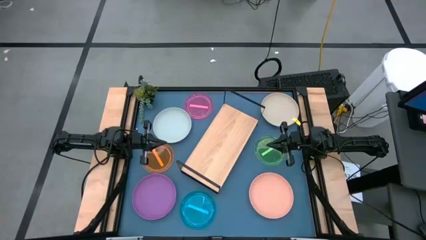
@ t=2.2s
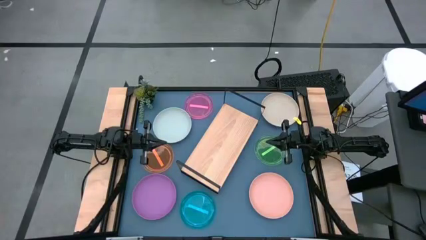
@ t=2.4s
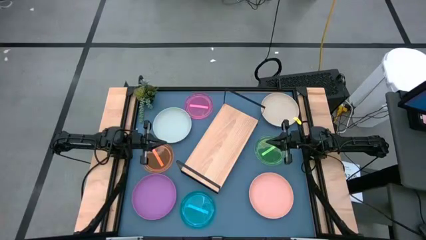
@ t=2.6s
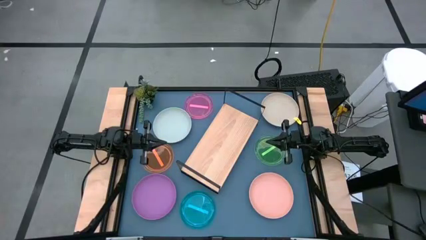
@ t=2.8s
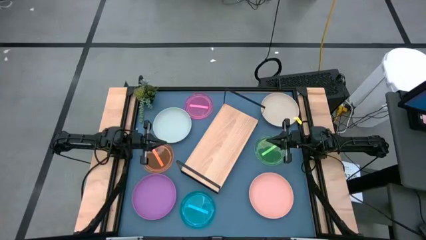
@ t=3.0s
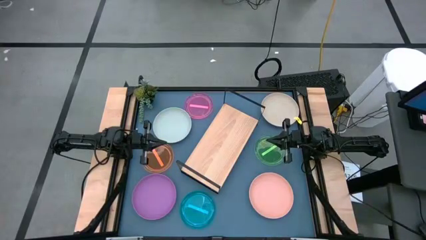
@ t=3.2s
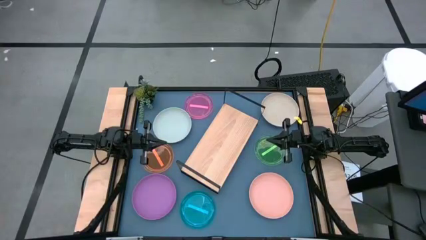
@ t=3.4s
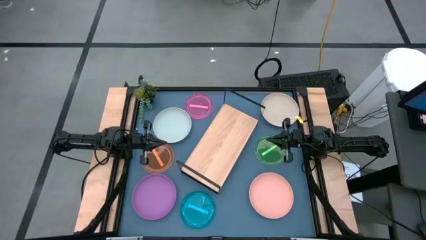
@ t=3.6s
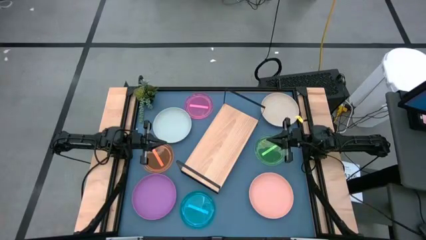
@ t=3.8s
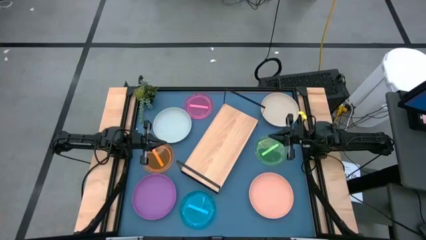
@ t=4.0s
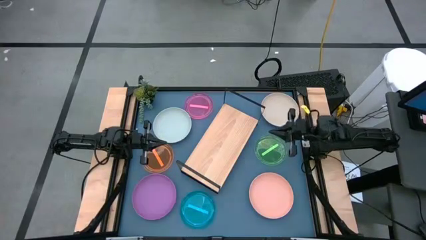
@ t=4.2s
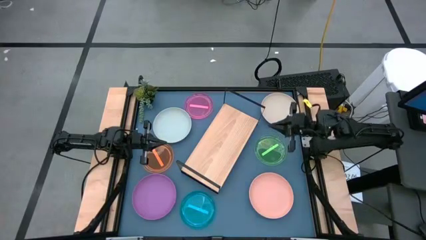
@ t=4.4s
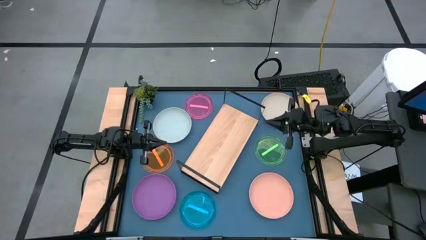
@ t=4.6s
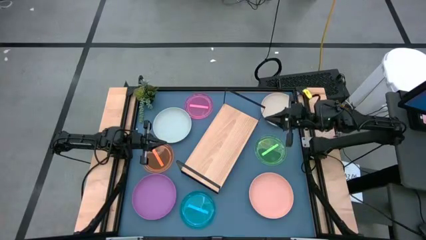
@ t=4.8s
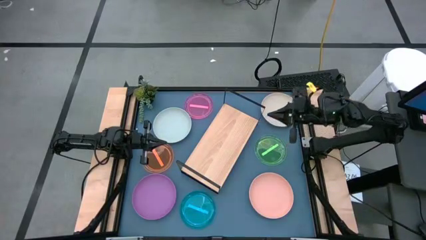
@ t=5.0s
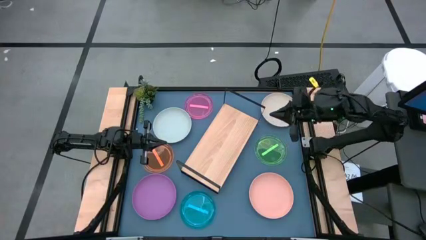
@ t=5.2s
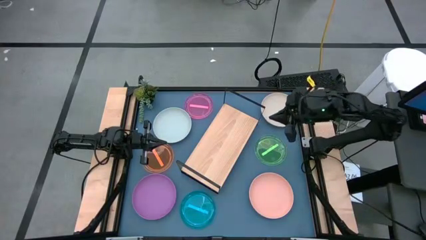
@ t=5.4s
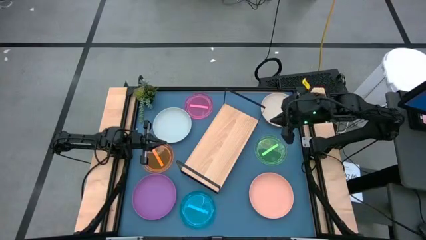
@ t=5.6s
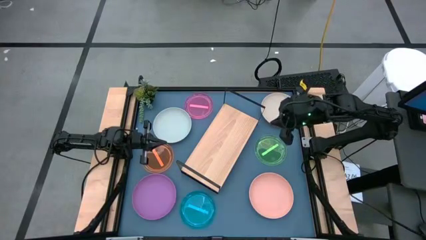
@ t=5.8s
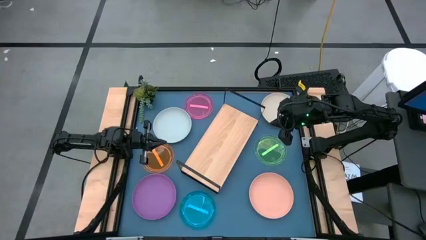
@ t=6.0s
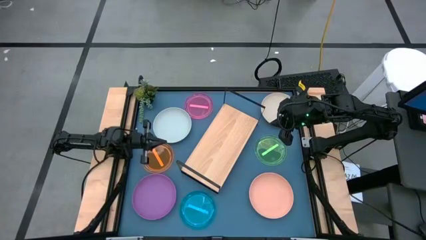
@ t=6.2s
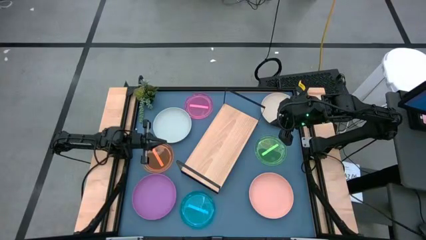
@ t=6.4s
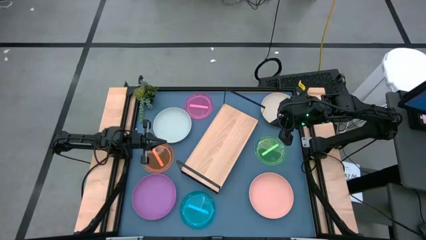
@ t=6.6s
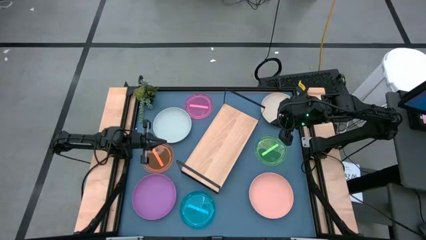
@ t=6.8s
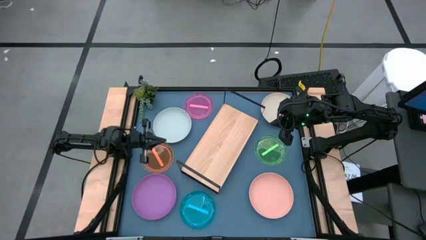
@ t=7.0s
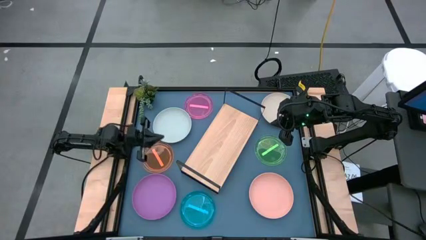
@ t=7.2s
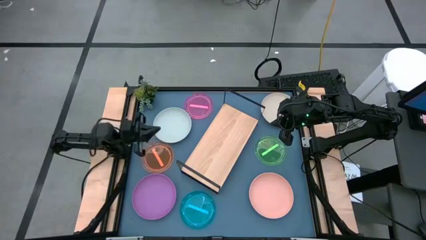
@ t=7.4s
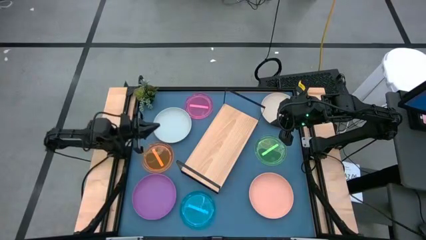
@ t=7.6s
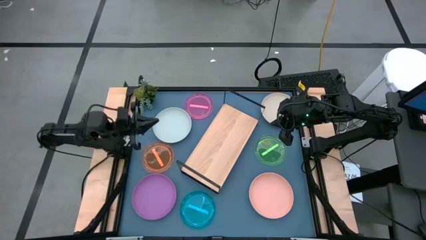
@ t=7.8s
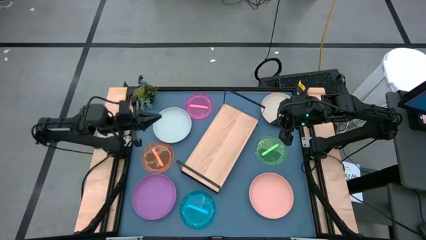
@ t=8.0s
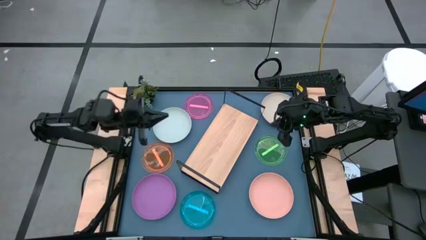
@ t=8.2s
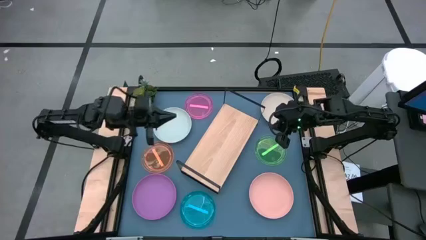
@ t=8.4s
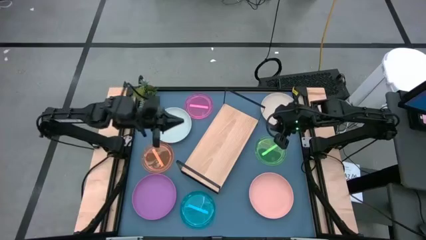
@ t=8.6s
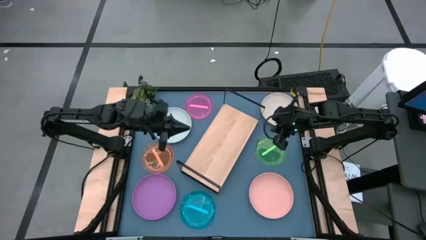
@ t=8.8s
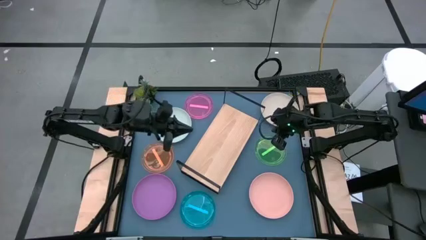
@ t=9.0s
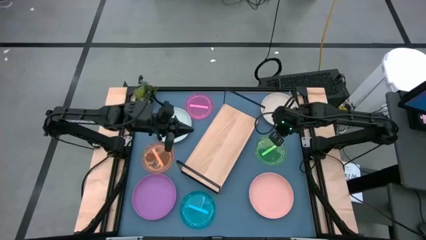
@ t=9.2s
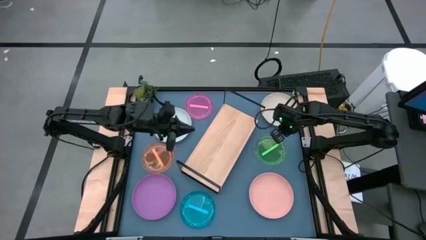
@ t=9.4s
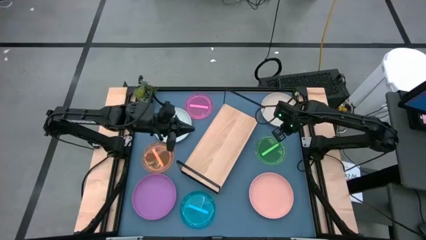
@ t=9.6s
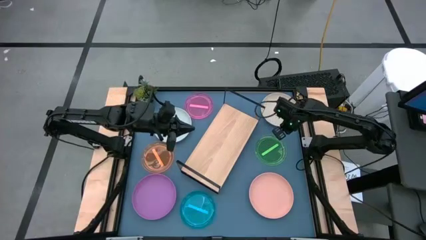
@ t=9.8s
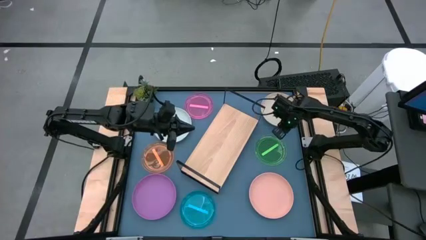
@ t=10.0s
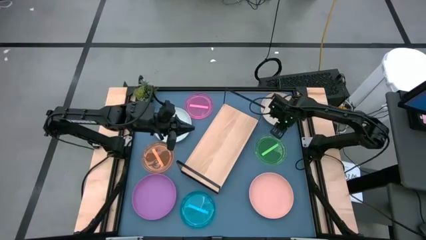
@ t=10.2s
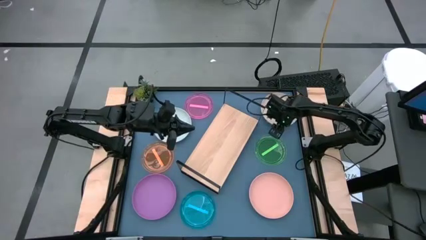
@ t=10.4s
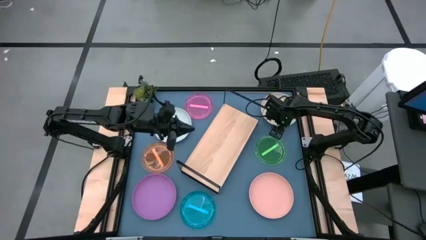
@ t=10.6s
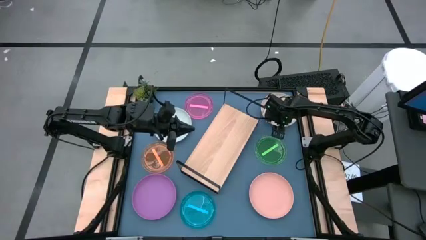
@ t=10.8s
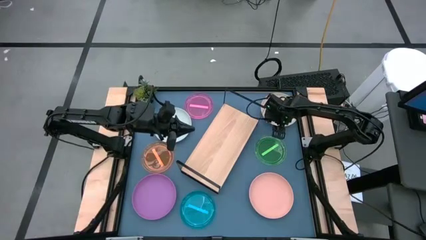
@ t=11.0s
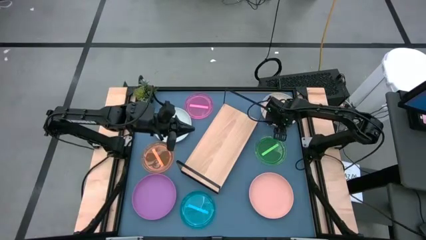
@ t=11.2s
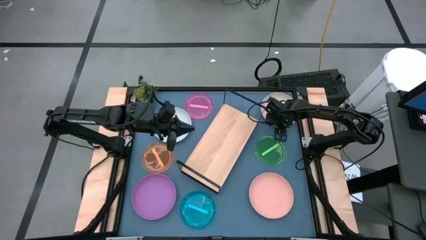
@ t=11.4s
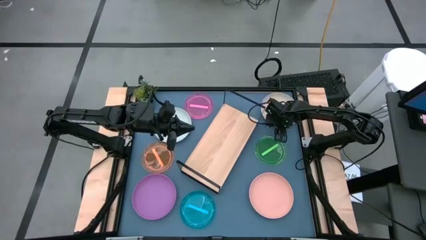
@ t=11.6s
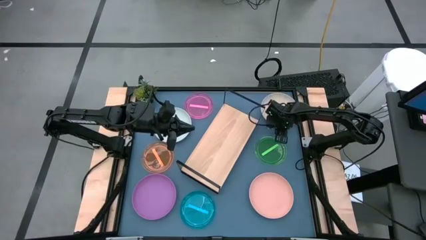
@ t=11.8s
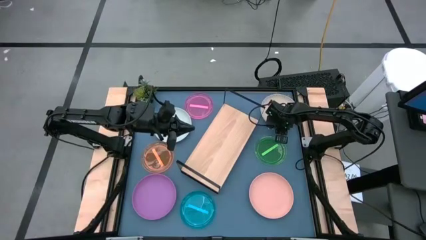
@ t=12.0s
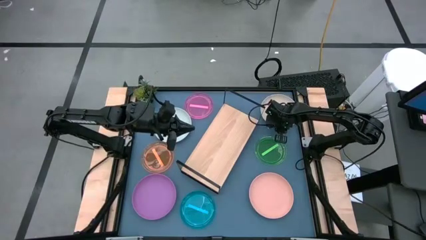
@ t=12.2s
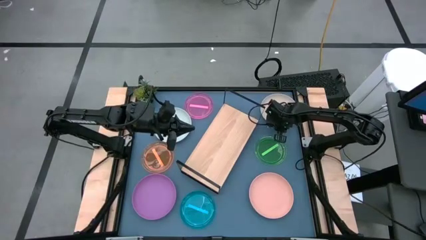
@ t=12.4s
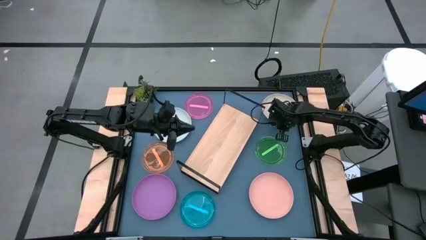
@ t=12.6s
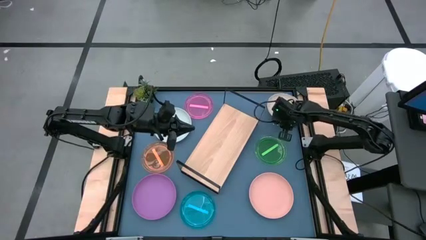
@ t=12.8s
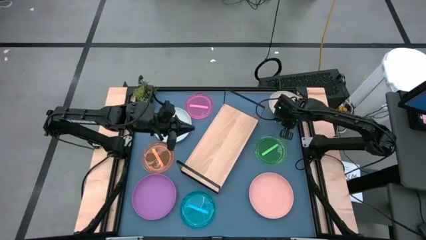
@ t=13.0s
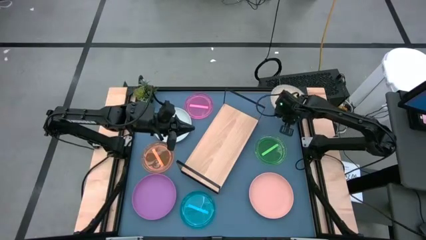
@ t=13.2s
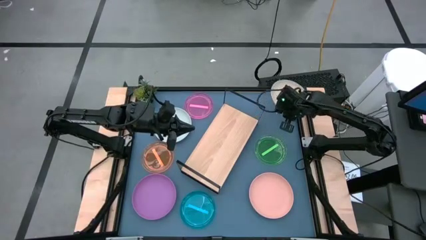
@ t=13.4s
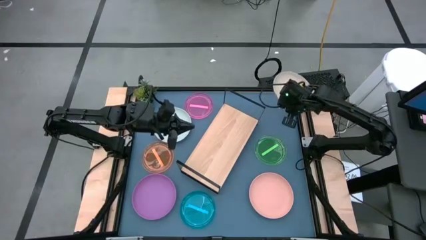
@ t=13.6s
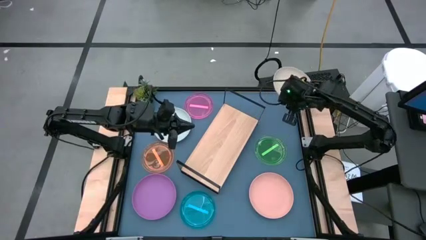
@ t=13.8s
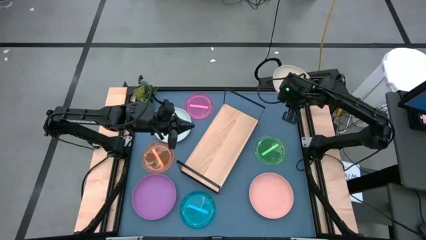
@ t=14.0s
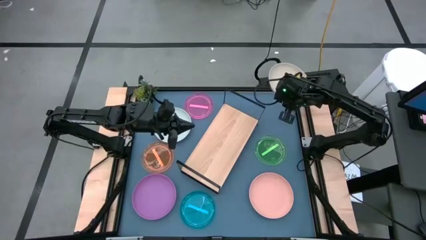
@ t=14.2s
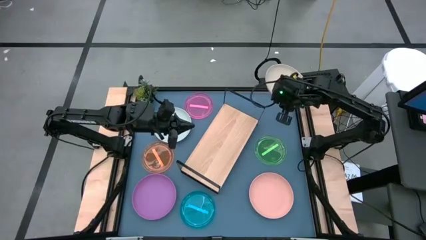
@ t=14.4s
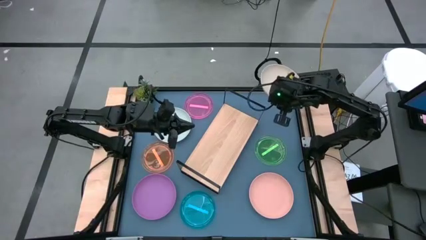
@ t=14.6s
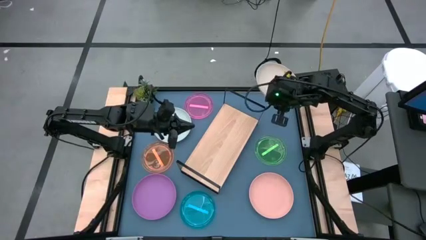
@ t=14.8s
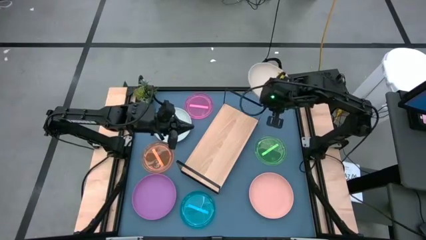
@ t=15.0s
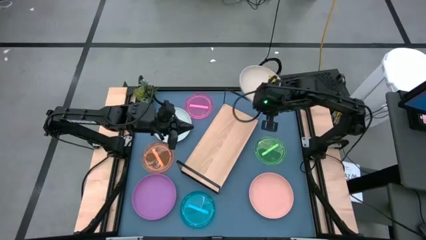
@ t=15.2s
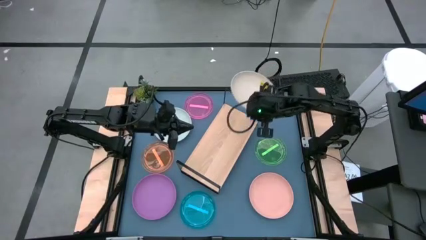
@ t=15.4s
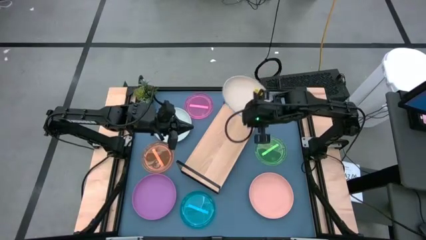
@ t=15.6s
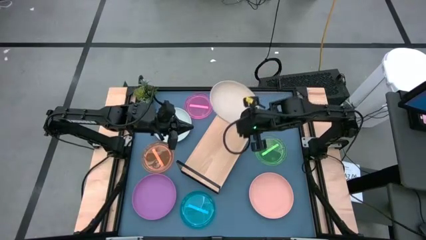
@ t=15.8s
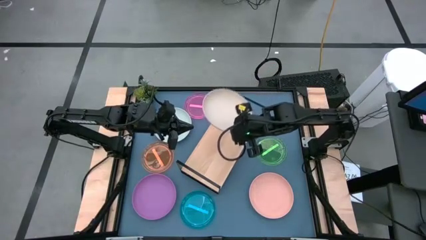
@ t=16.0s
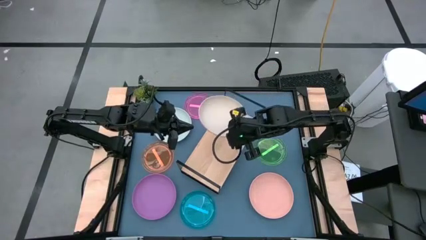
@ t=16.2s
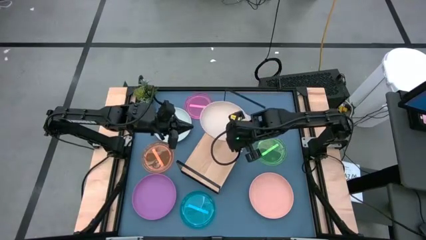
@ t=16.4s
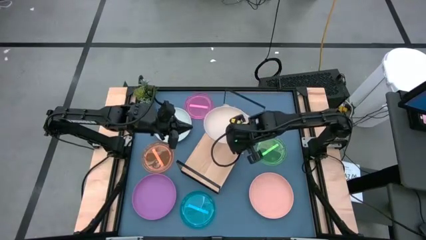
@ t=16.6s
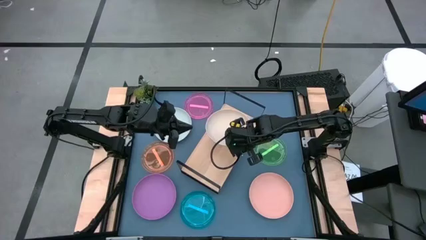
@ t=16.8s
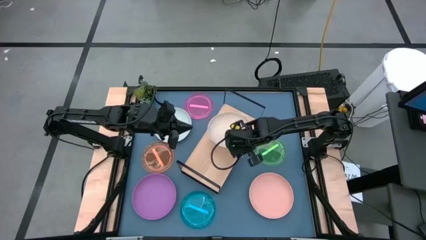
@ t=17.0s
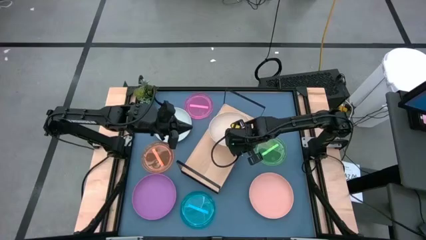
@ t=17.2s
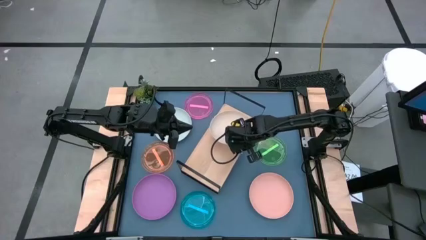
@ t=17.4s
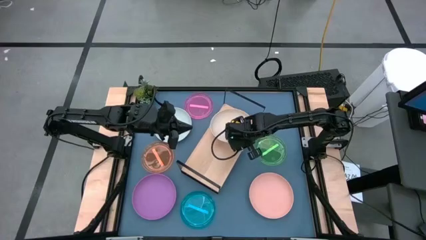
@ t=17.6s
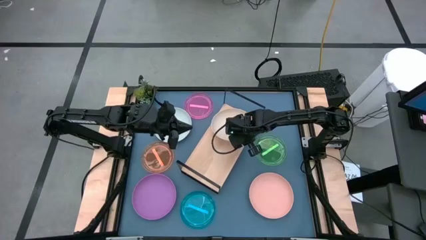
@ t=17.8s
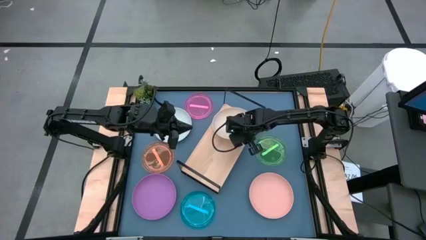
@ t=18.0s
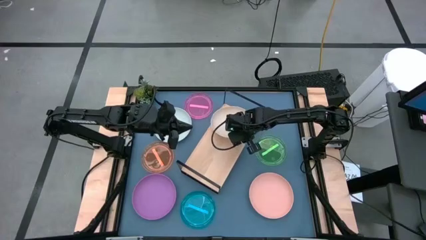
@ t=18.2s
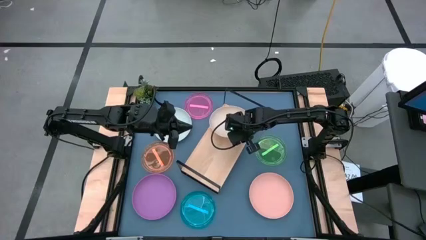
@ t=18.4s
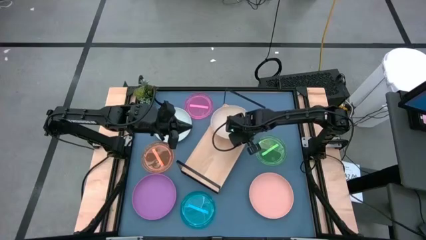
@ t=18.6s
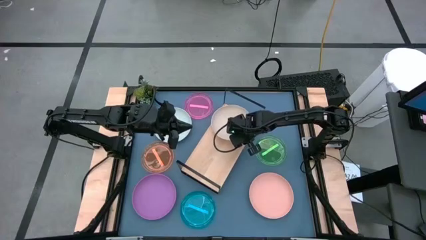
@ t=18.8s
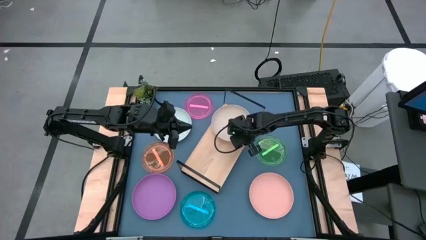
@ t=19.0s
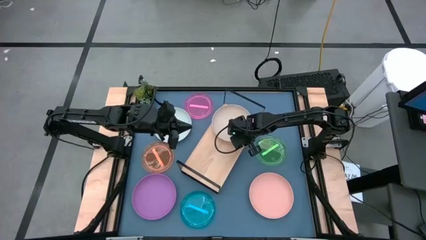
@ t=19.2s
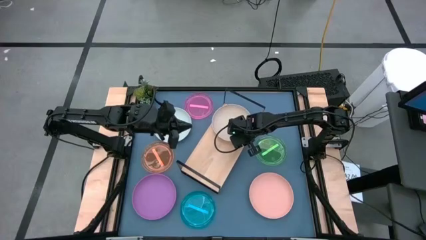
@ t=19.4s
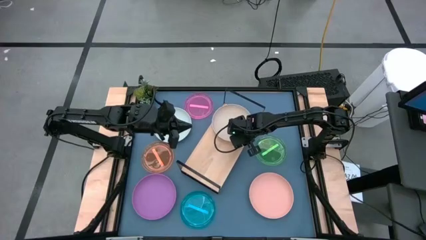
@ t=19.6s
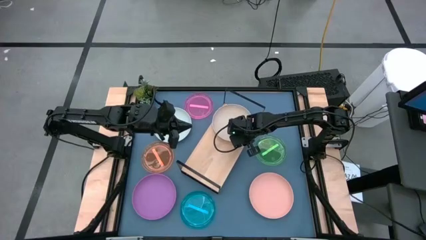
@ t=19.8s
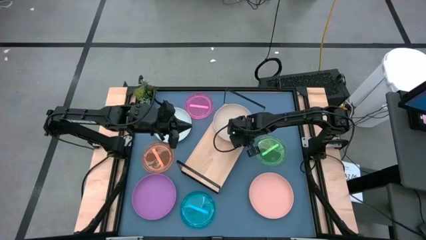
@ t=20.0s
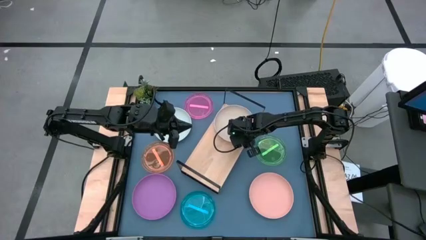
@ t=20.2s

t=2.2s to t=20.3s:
Task: Place and stack plates onto a shelf
Put the light brown plate on the shelf
